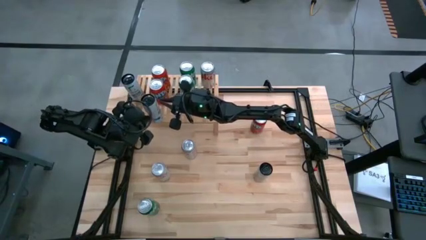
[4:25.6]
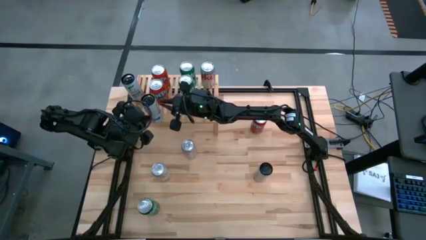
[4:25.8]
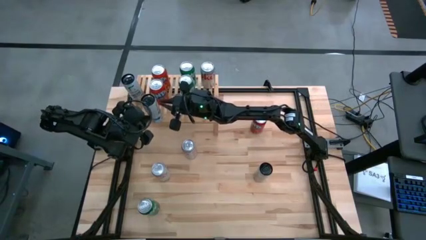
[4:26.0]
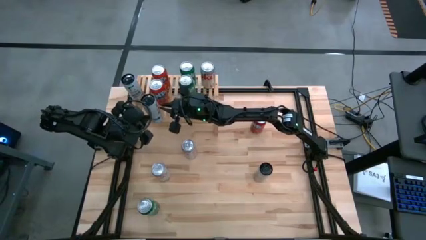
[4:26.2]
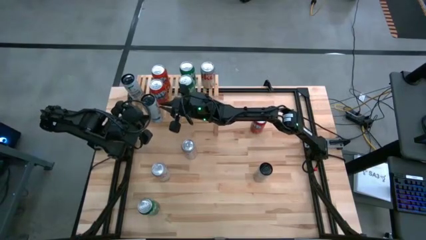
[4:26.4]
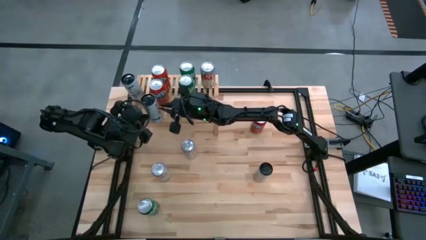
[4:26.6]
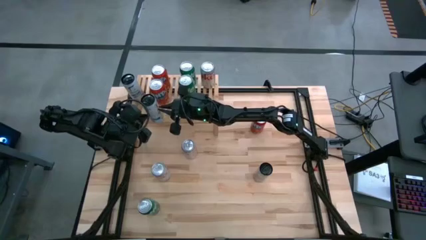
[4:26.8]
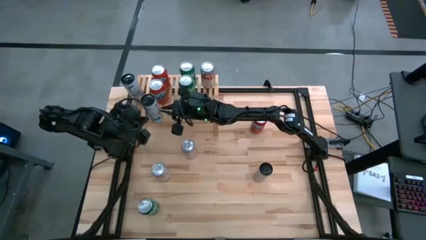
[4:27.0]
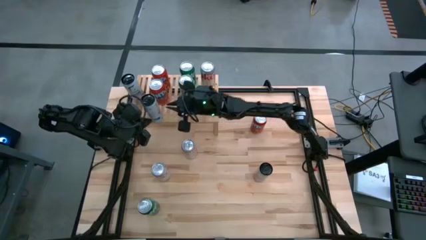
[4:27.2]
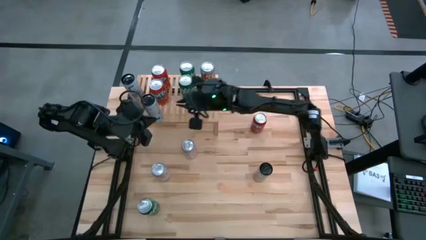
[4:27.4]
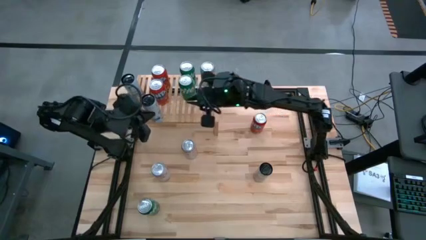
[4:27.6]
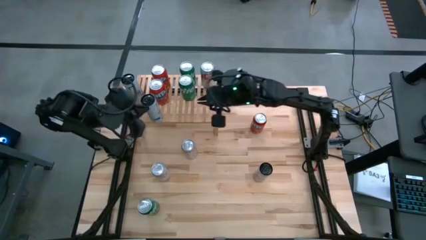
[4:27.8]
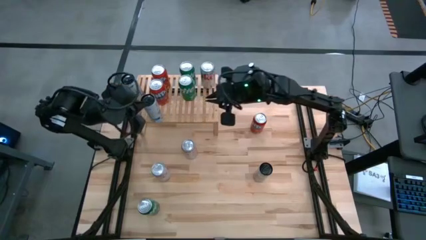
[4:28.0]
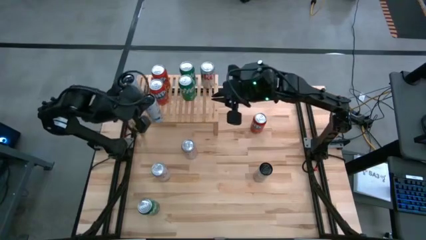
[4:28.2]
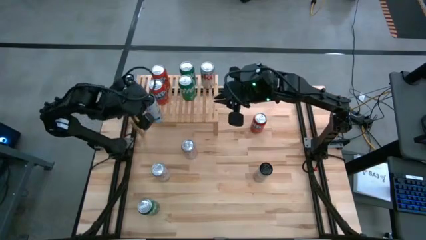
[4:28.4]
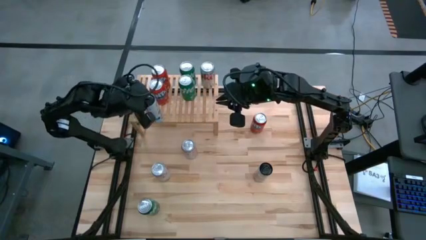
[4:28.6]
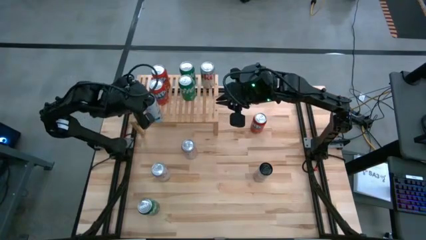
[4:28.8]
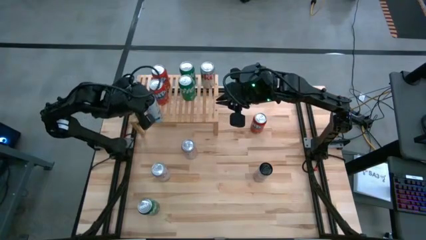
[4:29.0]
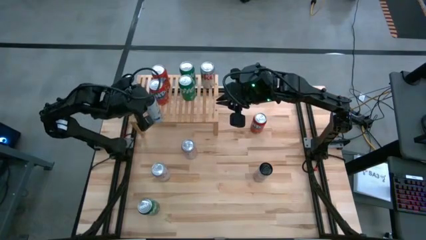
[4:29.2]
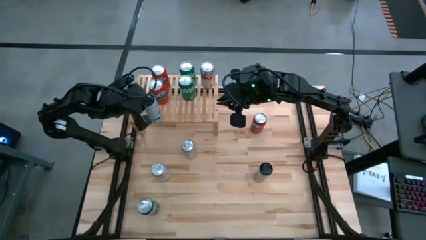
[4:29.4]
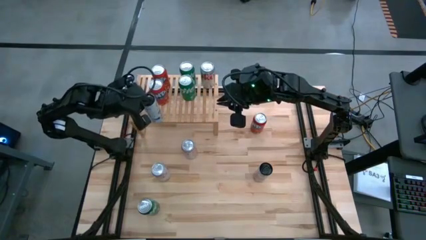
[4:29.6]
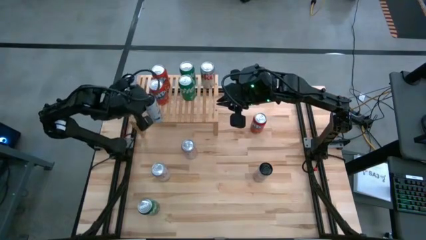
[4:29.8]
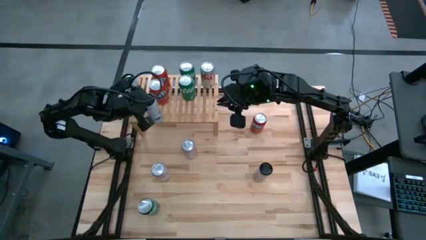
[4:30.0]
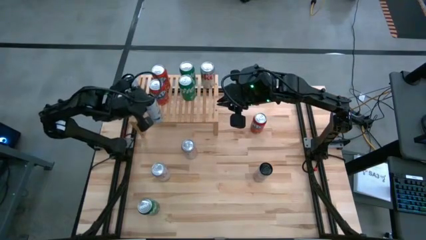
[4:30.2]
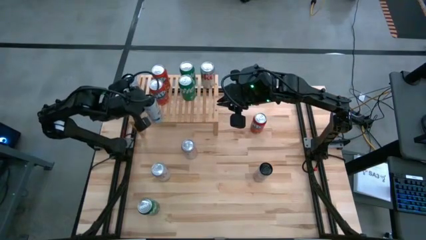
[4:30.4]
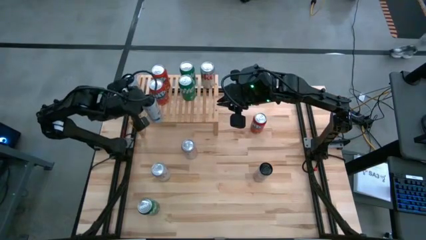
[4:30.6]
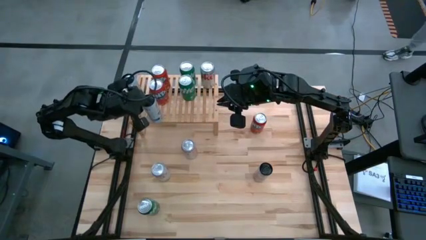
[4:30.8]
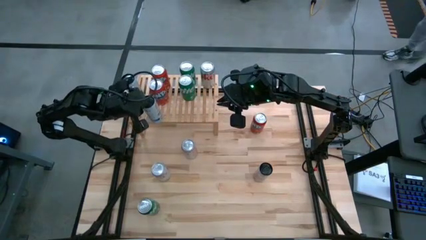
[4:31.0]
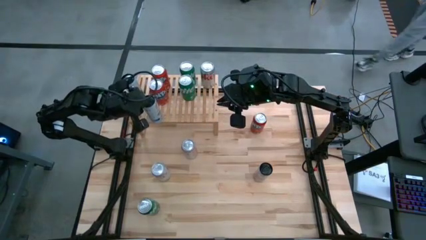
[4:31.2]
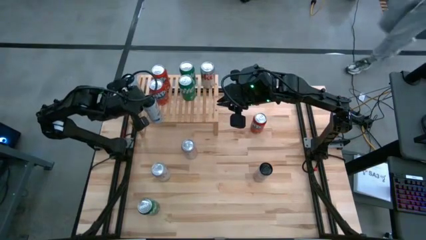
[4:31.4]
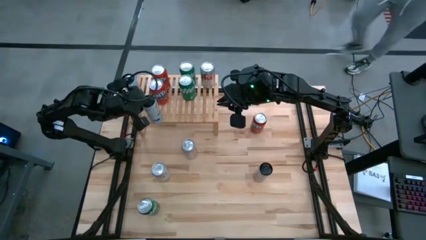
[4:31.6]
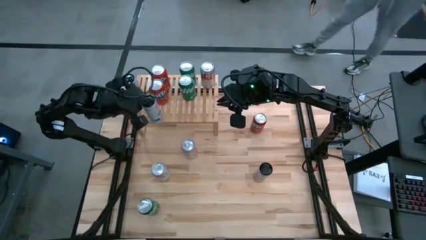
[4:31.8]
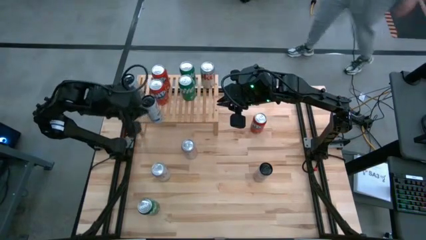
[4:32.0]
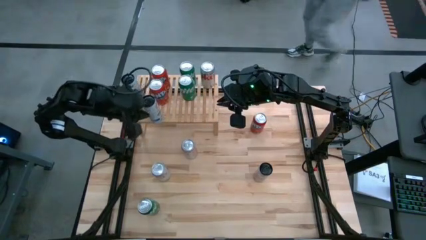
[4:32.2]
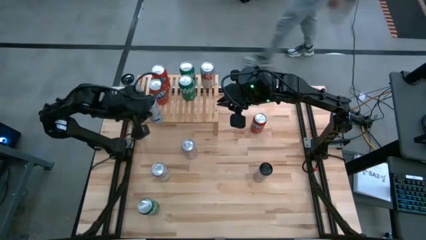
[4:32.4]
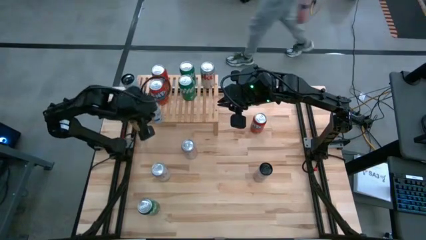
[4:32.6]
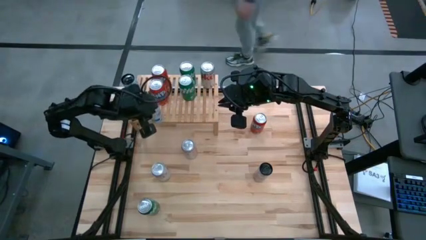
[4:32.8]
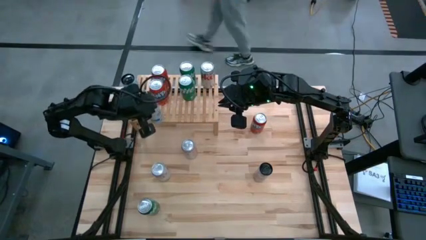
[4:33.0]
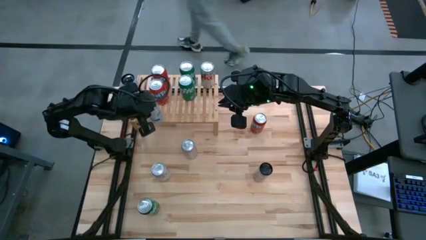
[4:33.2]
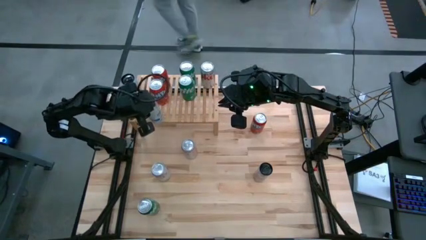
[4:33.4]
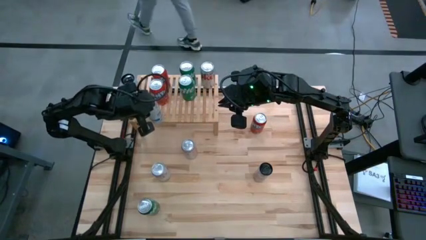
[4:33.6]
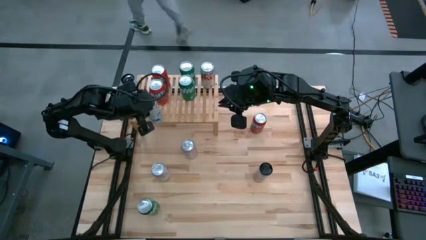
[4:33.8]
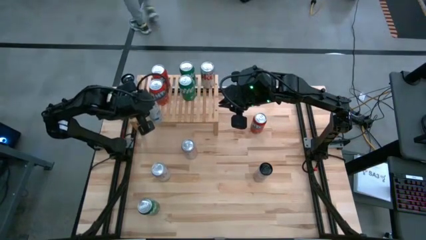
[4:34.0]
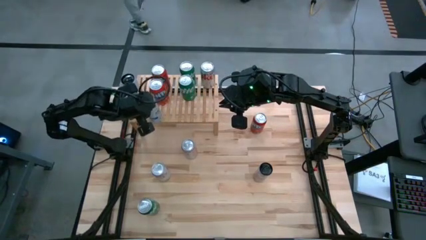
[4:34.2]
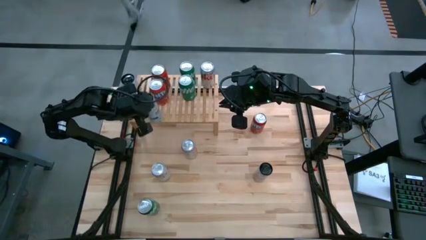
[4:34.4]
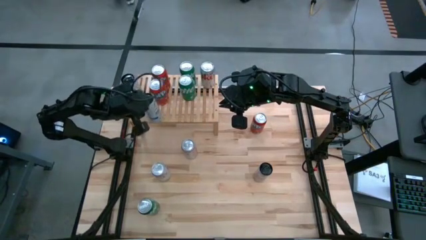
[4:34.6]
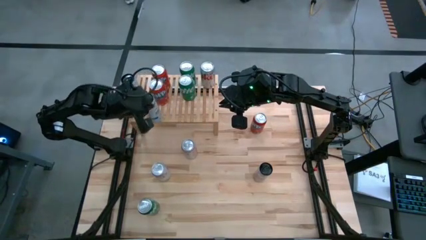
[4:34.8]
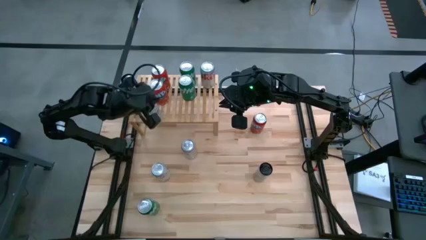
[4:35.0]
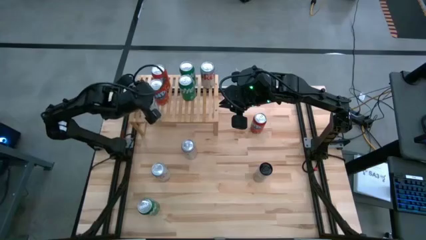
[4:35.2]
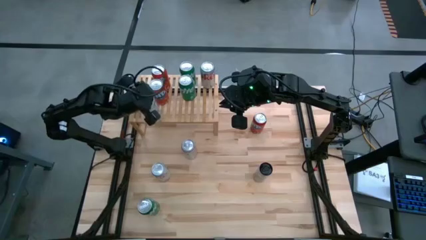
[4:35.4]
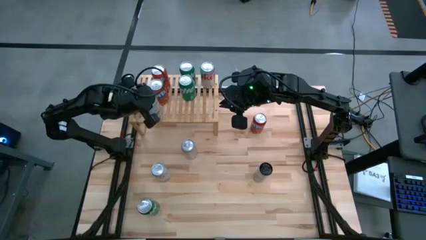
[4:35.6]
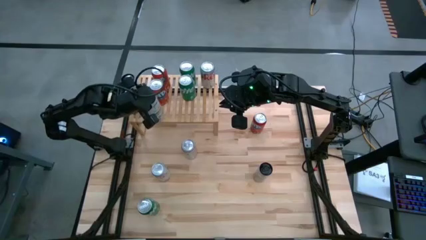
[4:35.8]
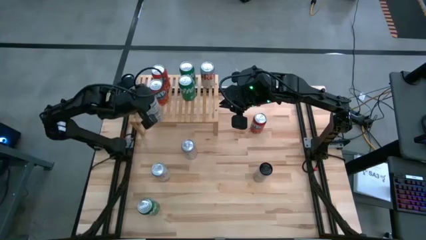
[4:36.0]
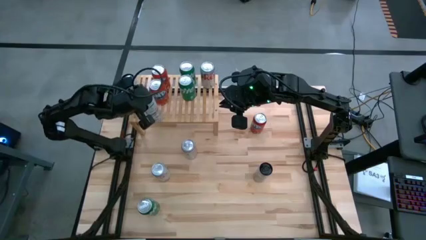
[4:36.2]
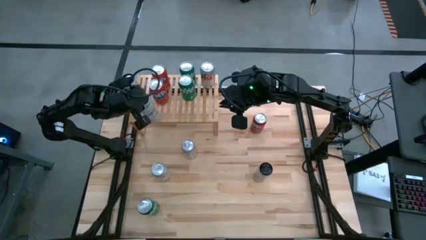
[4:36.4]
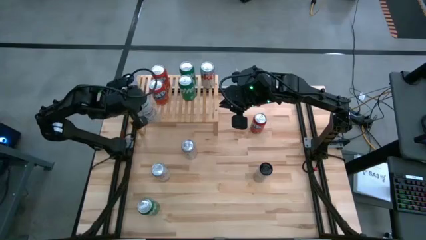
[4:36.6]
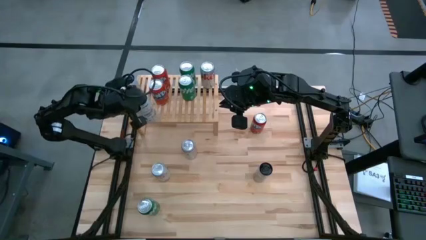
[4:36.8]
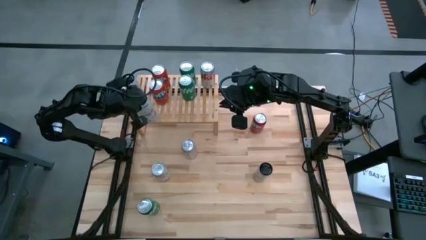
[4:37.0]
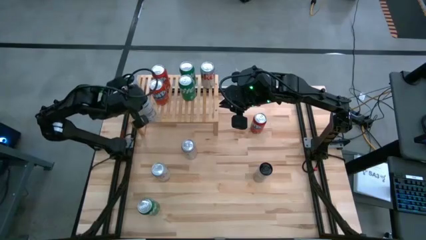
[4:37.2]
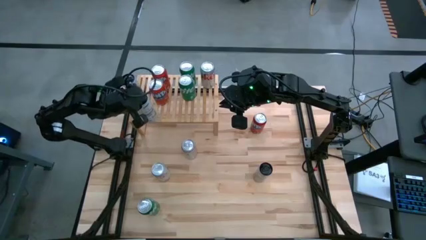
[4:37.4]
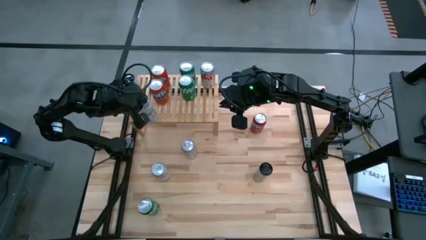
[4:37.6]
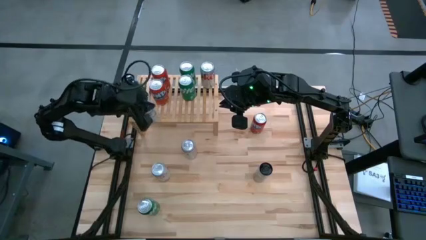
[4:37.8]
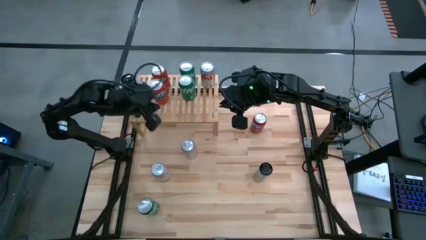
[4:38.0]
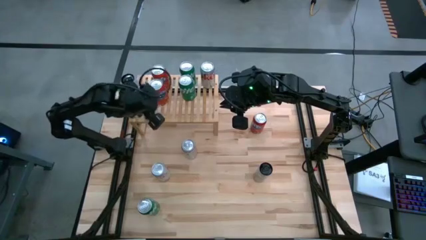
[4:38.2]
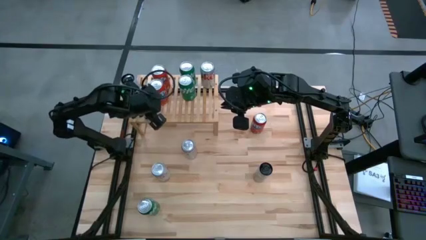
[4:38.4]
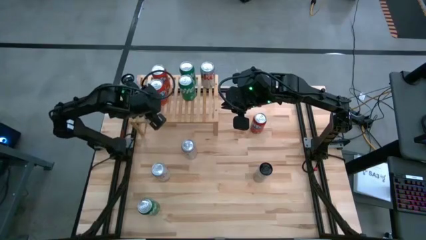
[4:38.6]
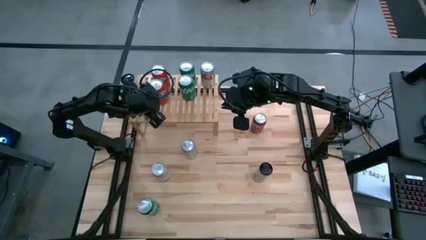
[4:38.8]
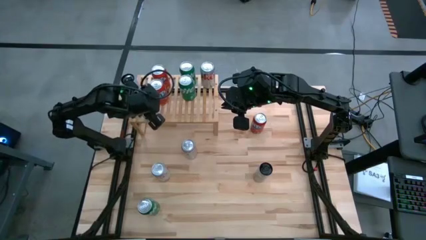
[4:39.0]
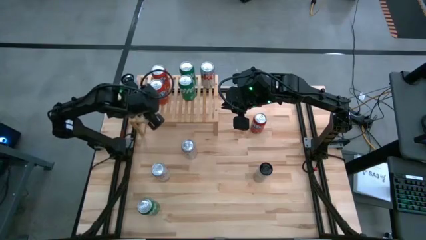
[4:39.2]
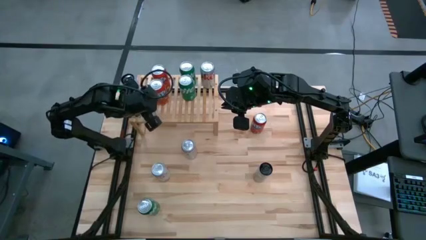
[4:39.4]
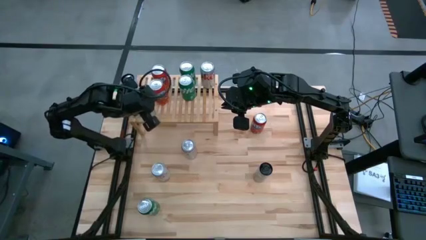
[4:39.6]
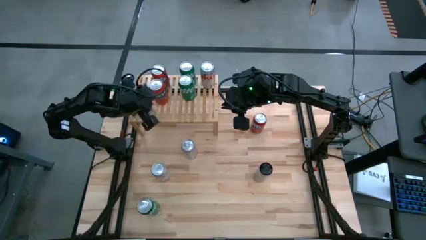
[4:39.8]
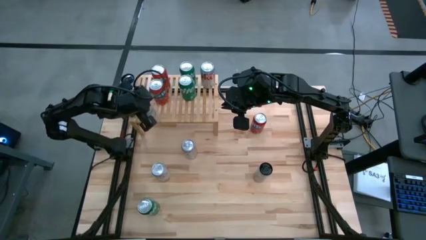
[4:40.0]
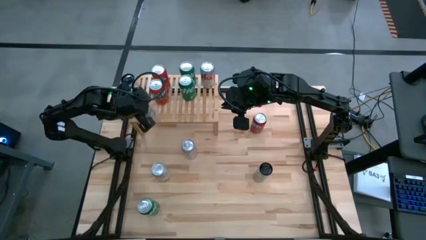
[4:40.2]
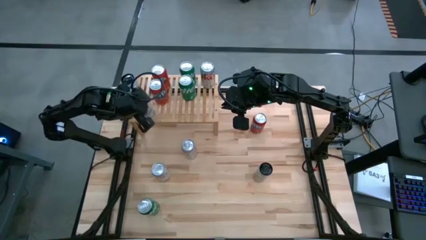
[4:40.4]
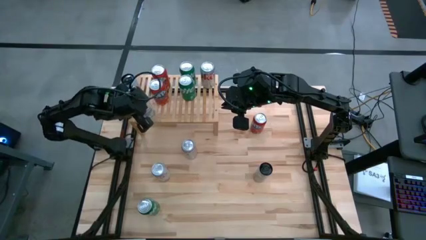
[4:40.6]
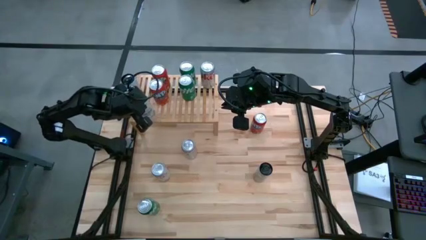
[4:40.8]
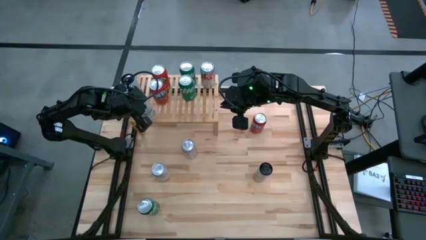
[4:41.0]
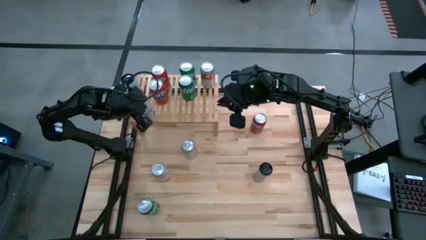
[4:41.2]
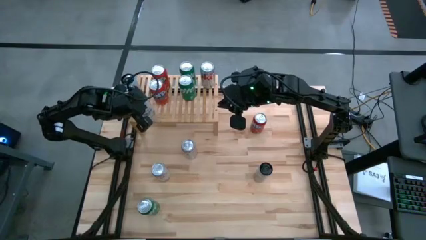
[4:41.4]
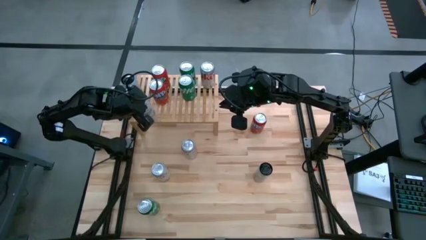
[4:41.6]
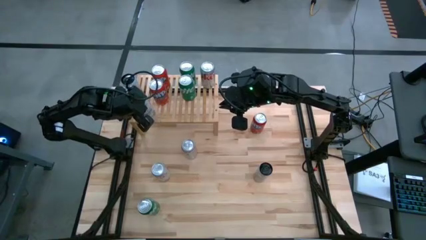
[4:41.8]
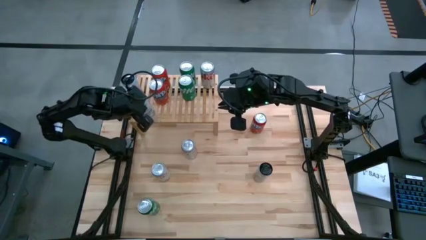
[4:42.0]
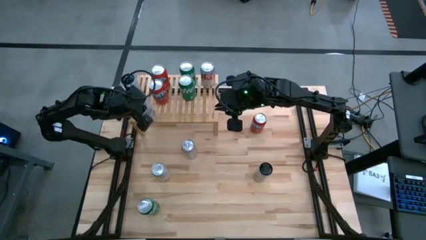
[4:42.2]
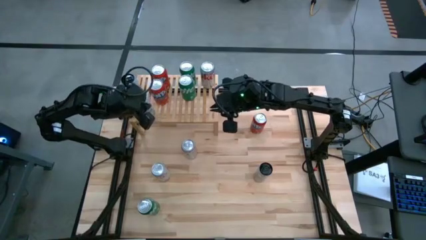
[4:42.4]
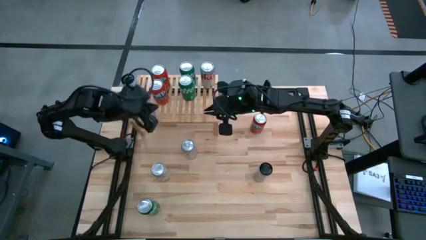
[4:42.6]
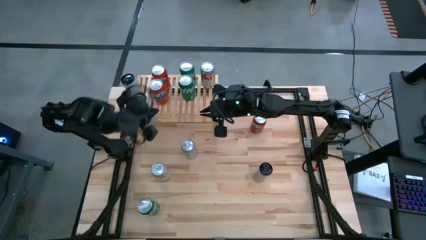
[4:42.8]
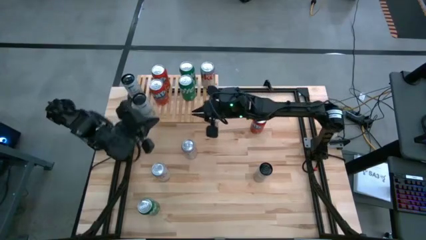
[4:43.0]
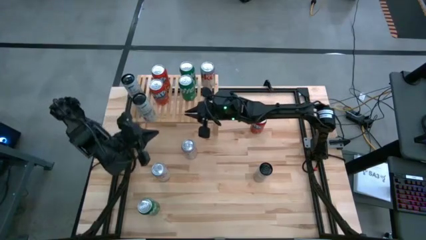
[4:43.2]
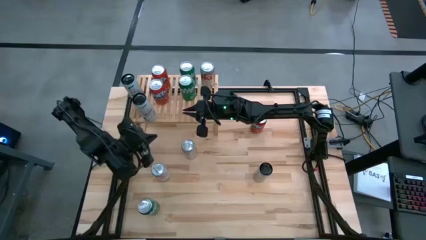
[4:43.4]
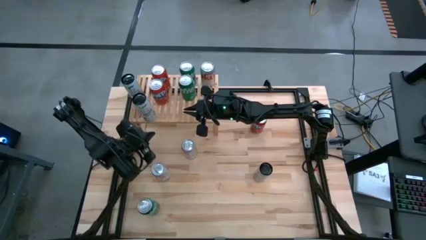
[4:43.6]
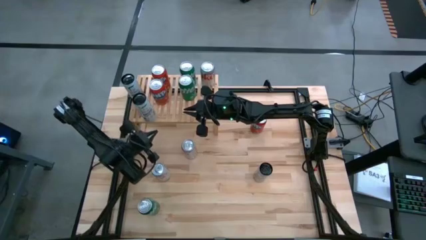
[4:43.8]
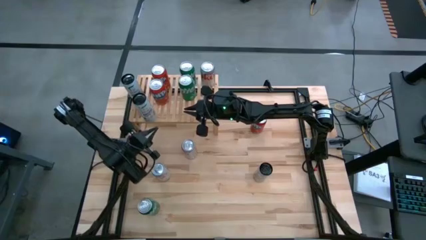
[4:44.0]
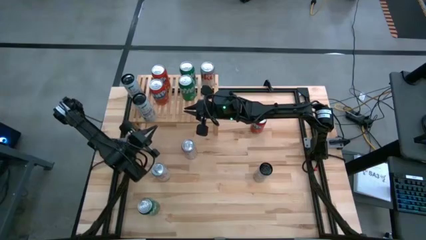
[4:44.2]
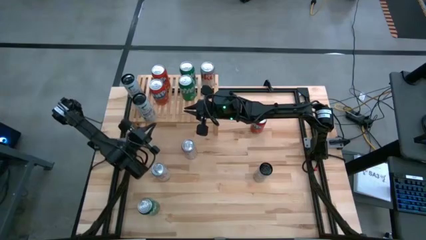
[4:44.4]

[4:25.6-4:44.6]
Task: Place canned beverage on shelf
Put the top white/blue soda can on the shelf aligned with the other white/blue soda can
